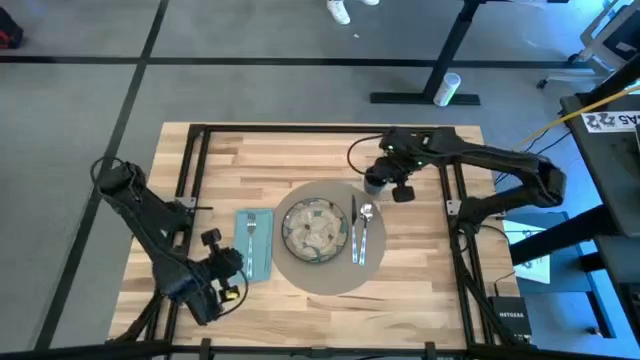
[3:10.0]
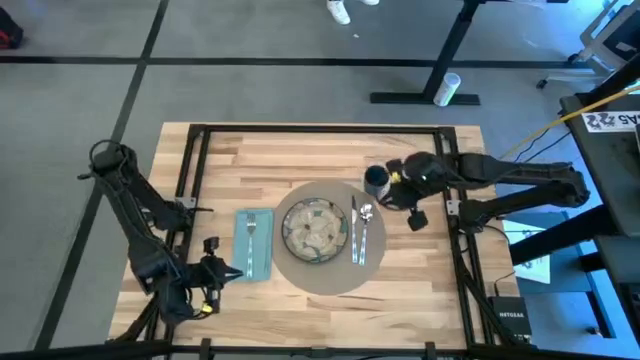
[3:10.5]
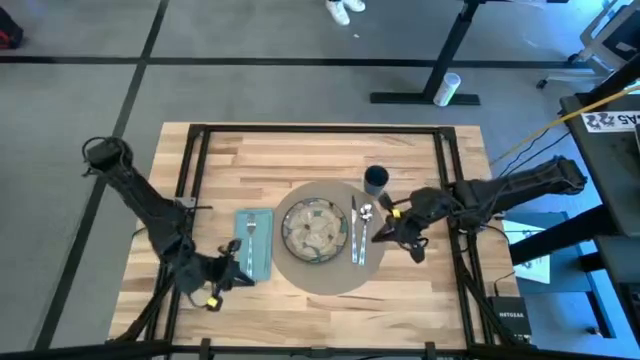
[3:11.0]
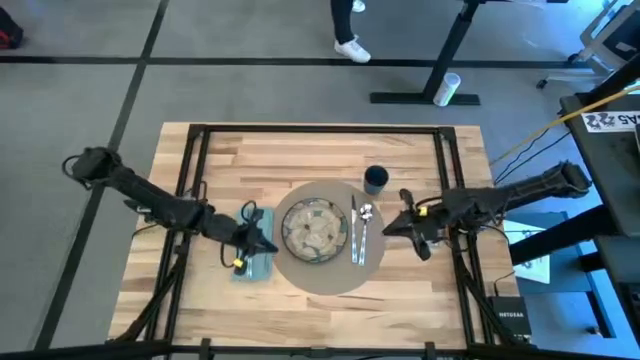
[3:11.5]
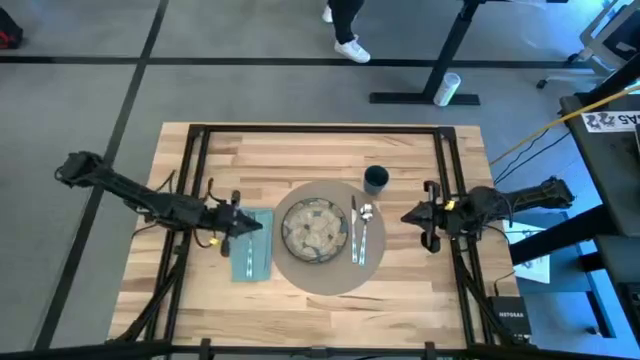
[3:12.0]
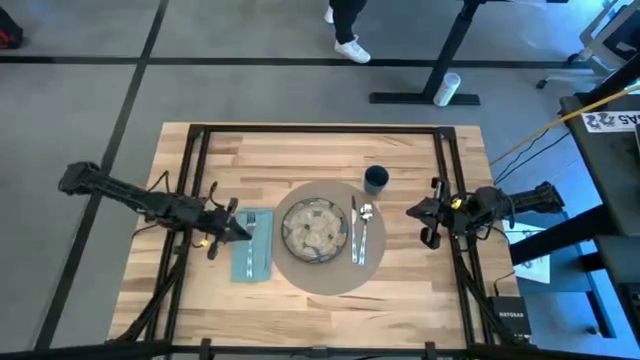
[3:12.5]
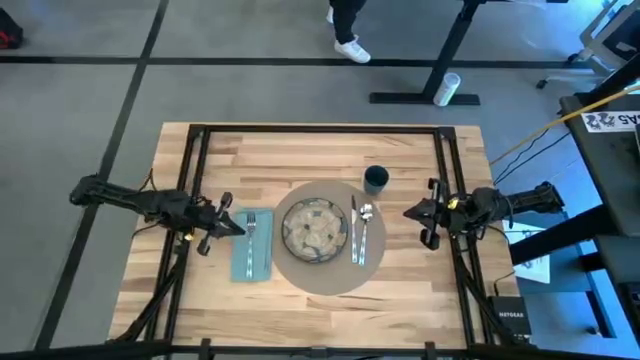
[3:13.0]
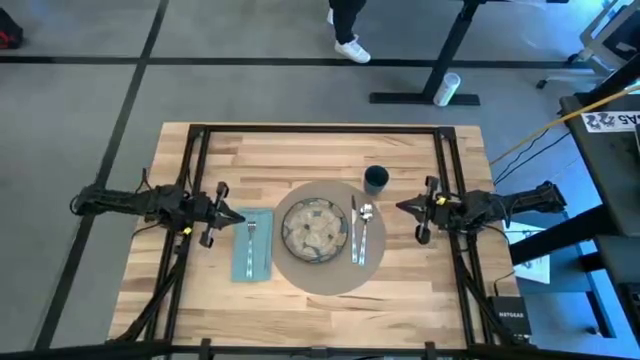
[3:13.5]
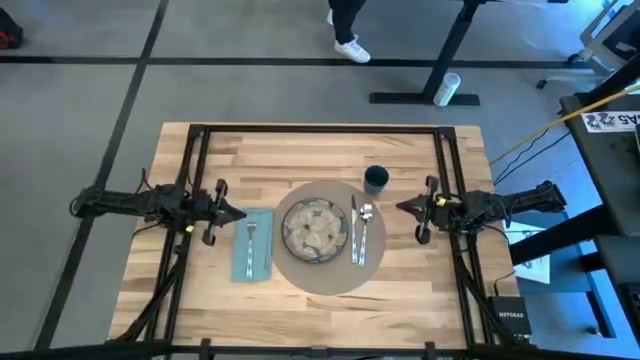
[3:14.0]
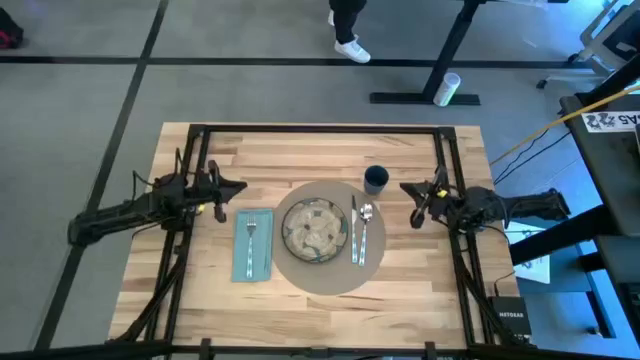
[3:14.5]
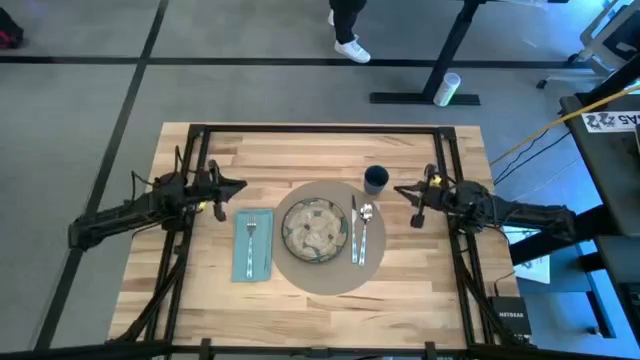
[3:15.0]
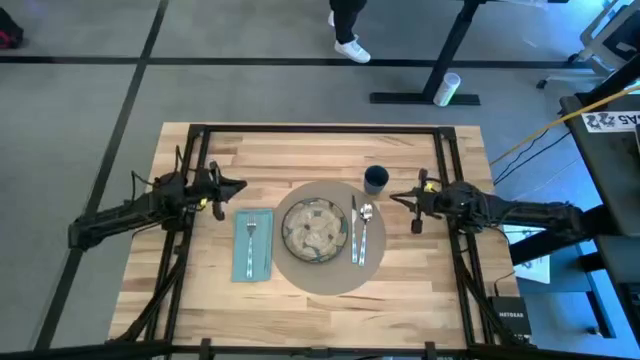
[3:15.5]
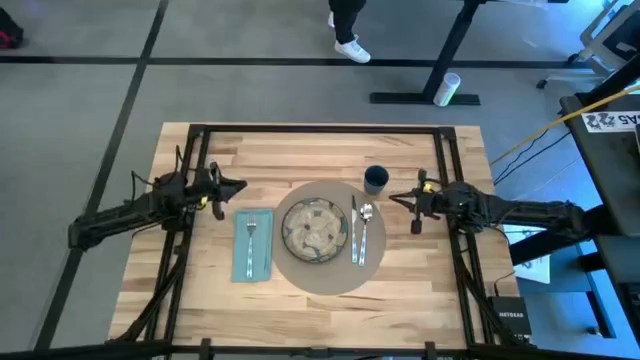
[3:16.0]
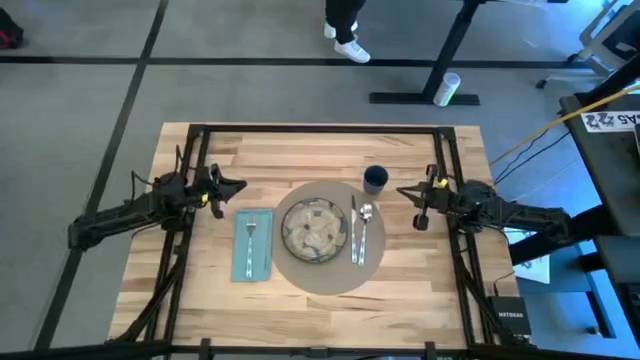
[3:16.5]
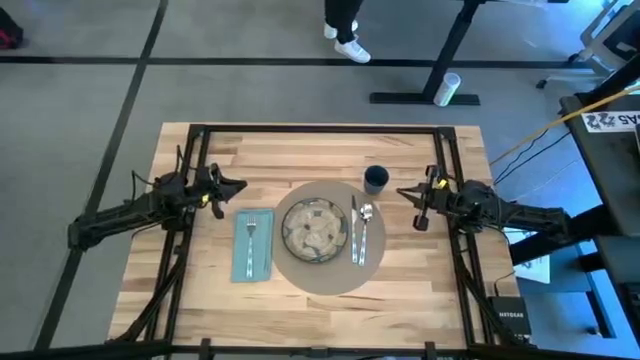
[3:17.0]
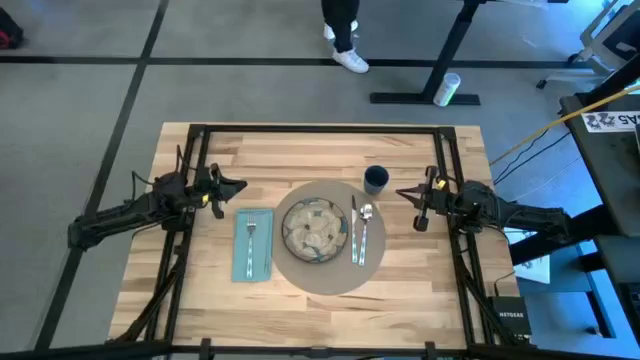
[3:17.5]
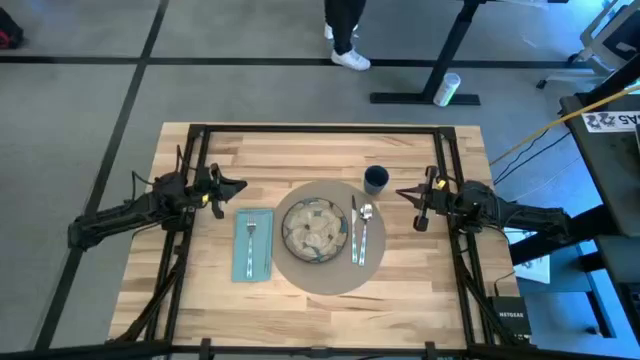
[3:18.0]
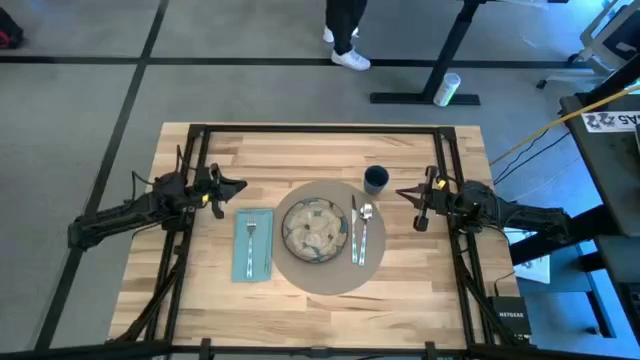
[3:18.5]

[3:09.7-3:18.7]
Task: Set table place
Return to Home Position

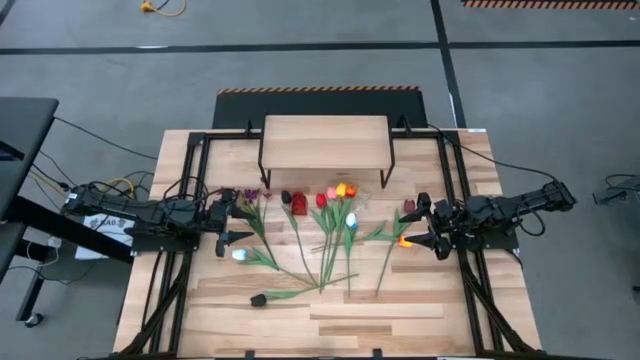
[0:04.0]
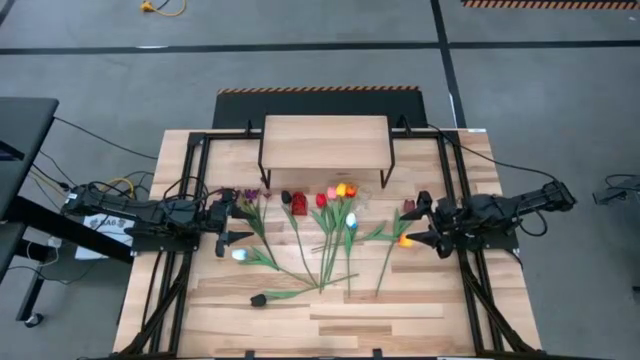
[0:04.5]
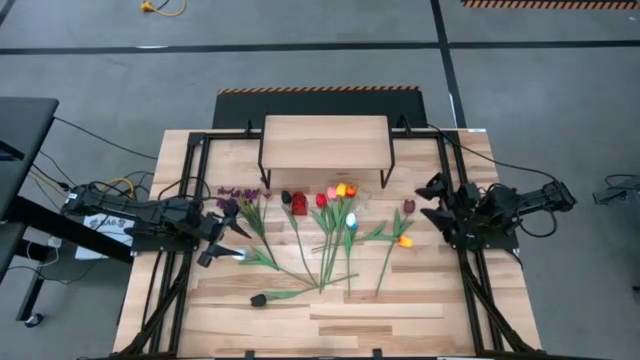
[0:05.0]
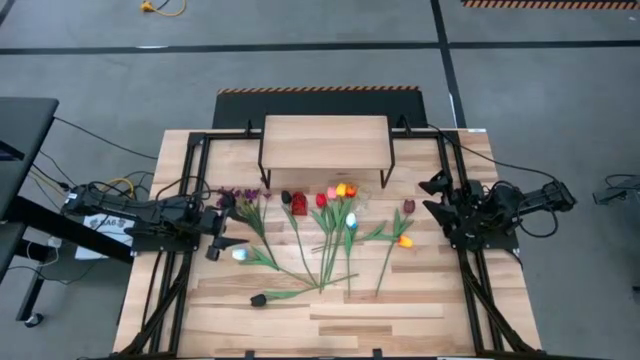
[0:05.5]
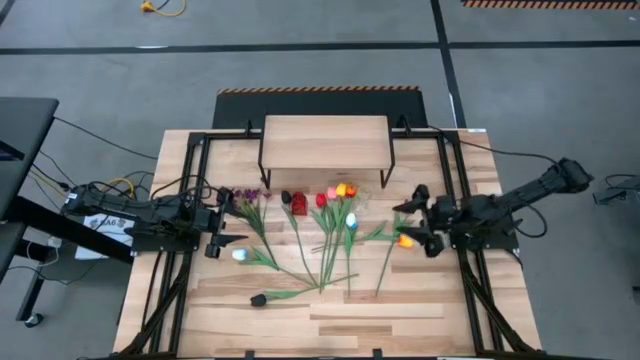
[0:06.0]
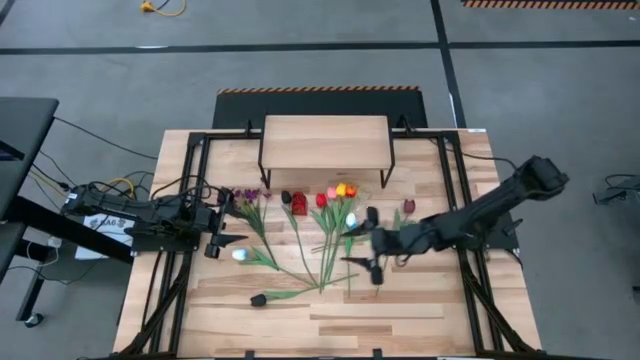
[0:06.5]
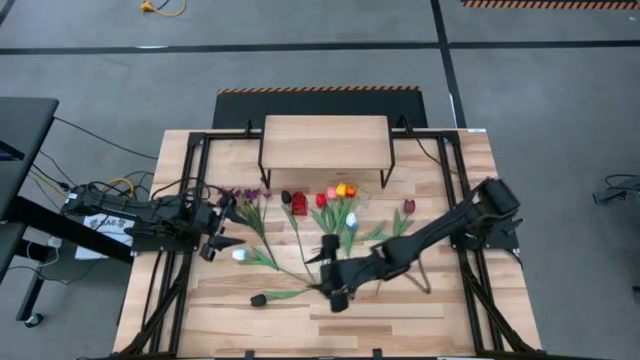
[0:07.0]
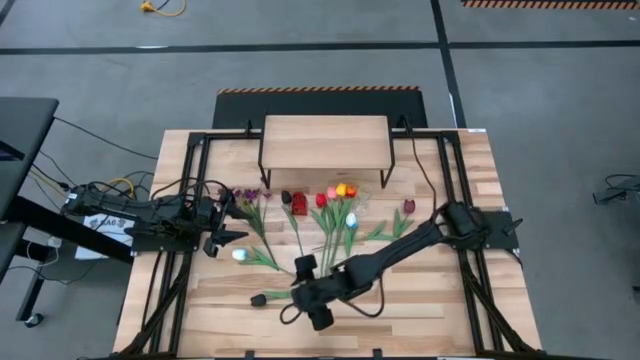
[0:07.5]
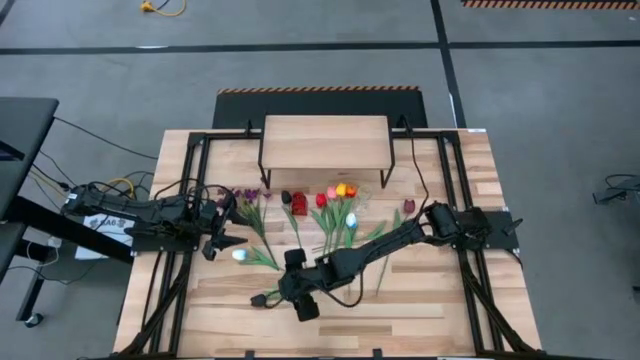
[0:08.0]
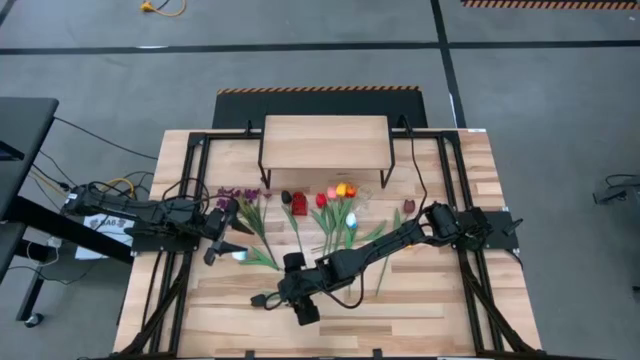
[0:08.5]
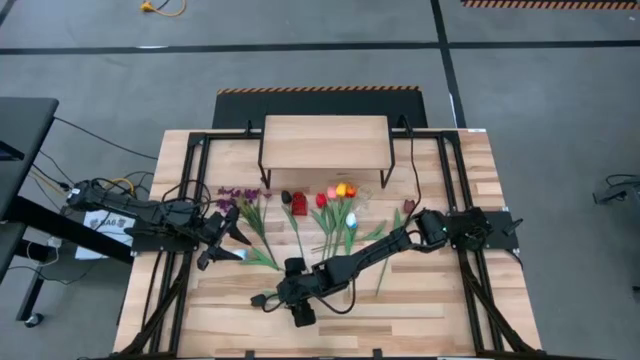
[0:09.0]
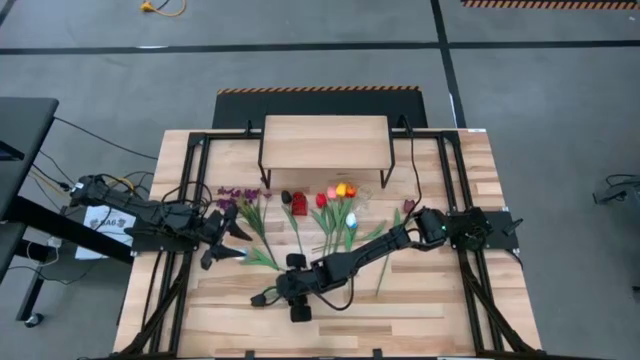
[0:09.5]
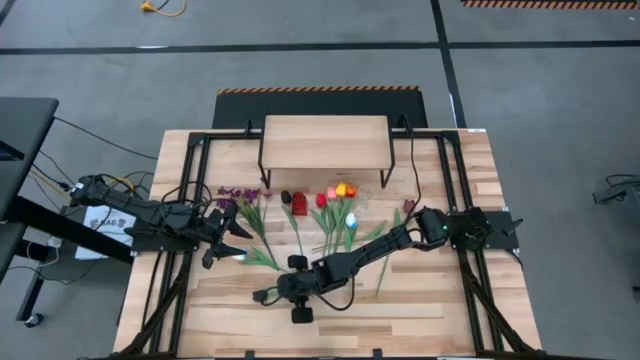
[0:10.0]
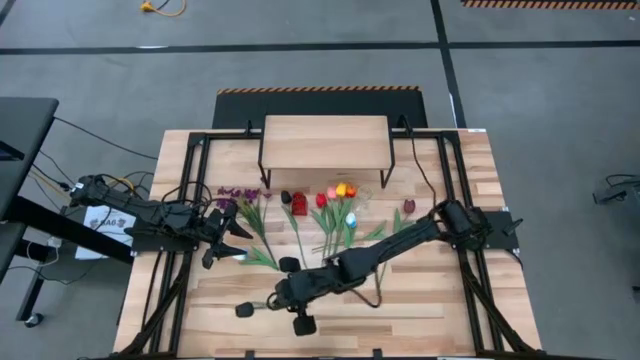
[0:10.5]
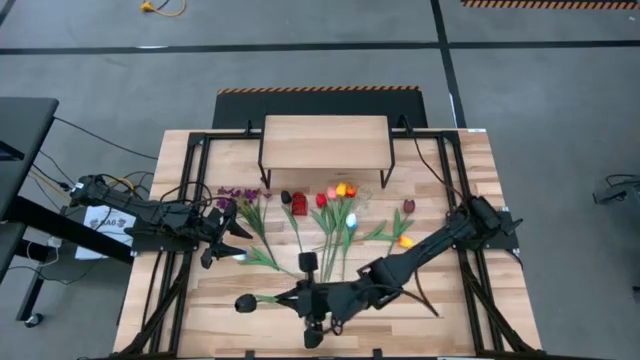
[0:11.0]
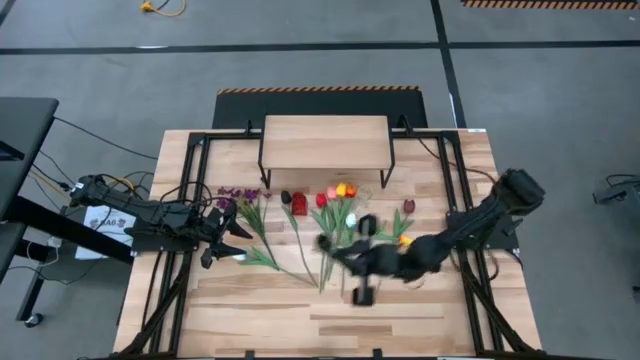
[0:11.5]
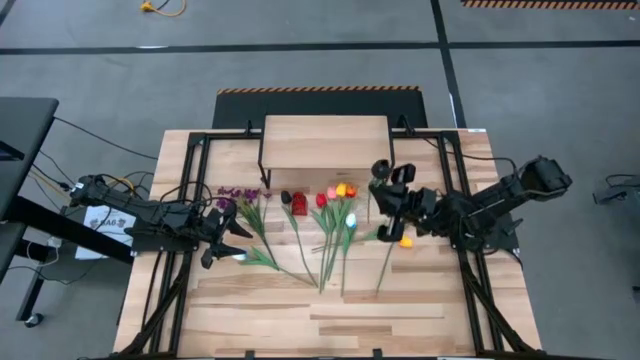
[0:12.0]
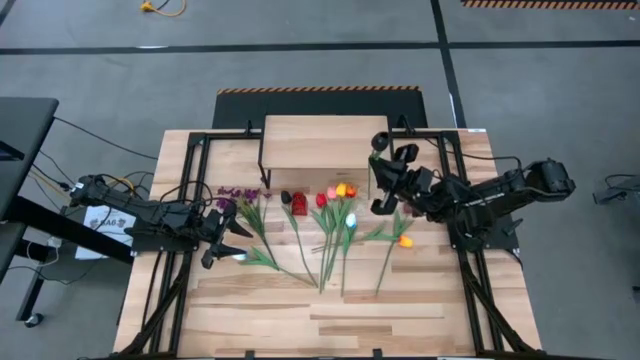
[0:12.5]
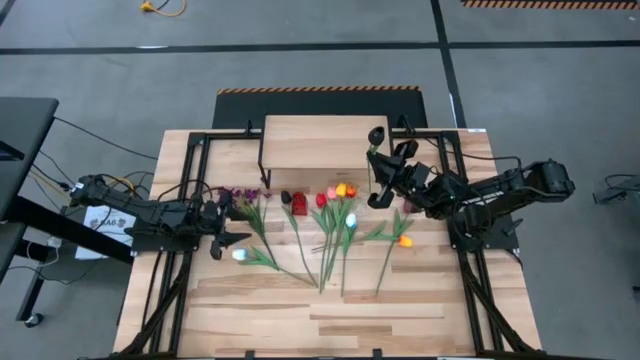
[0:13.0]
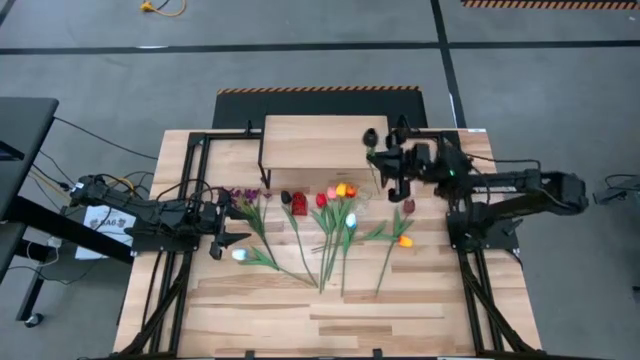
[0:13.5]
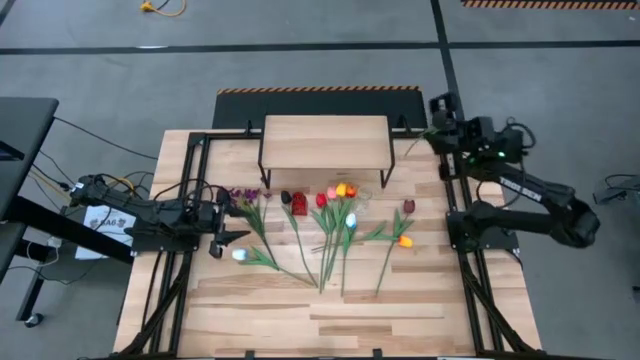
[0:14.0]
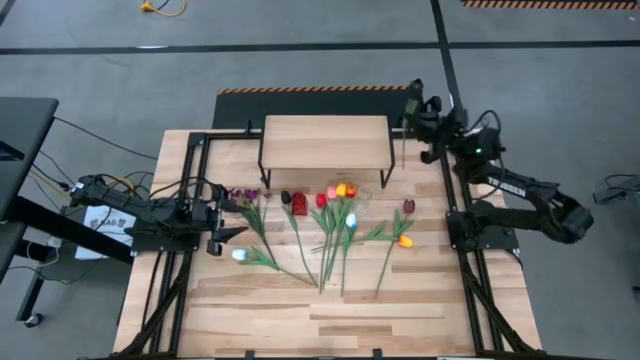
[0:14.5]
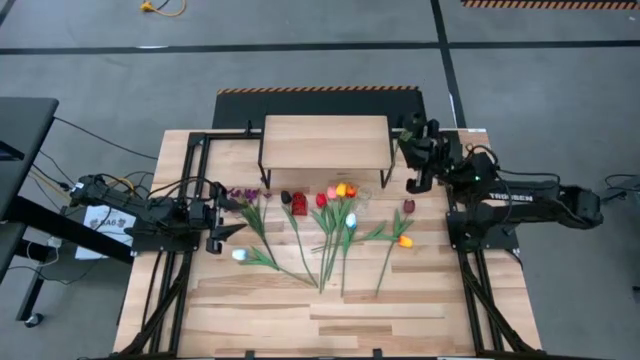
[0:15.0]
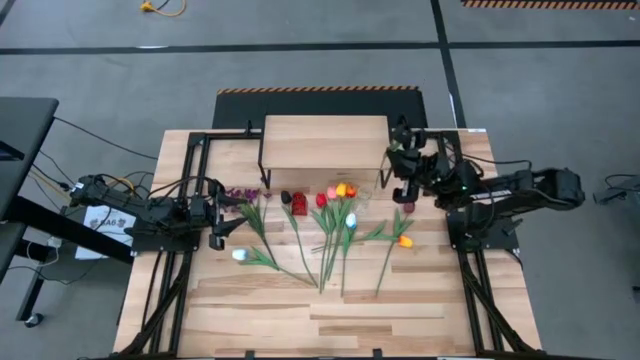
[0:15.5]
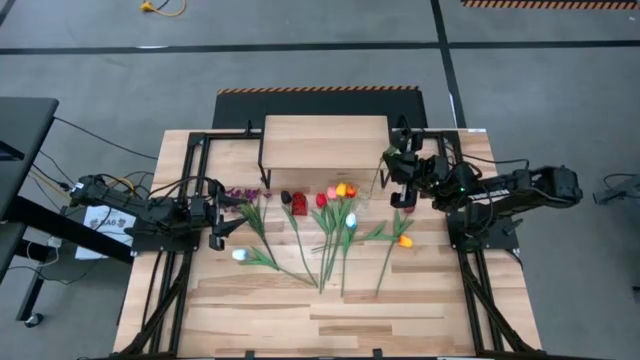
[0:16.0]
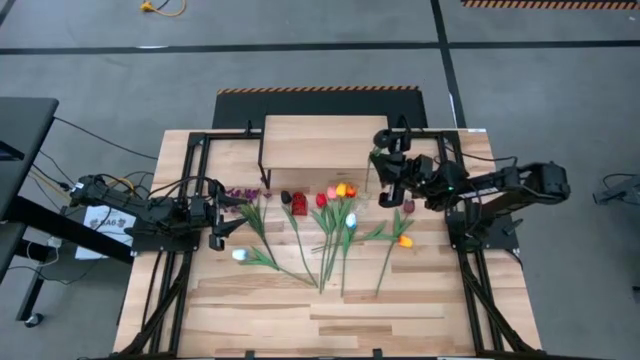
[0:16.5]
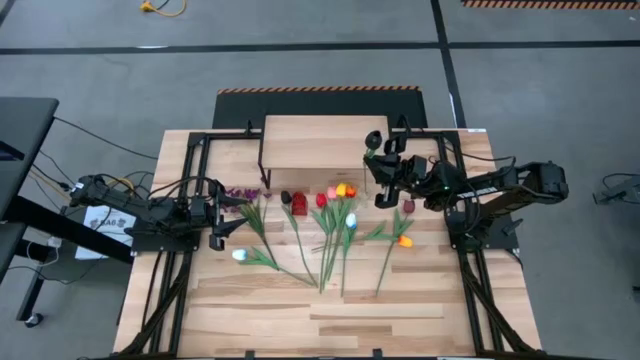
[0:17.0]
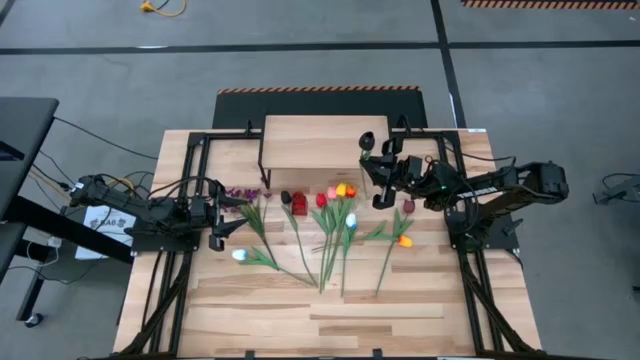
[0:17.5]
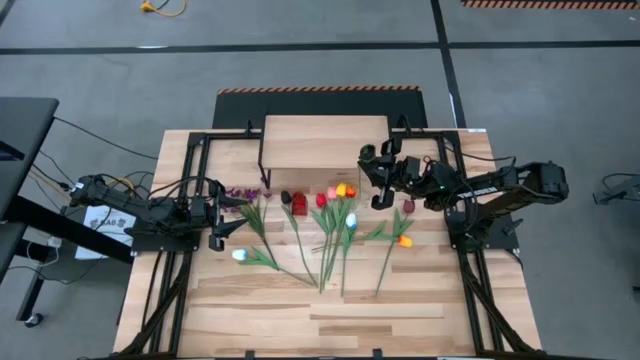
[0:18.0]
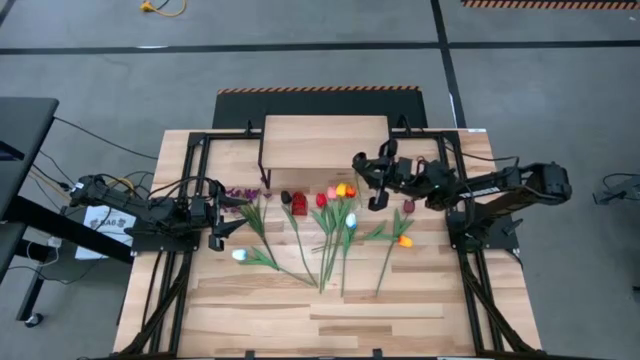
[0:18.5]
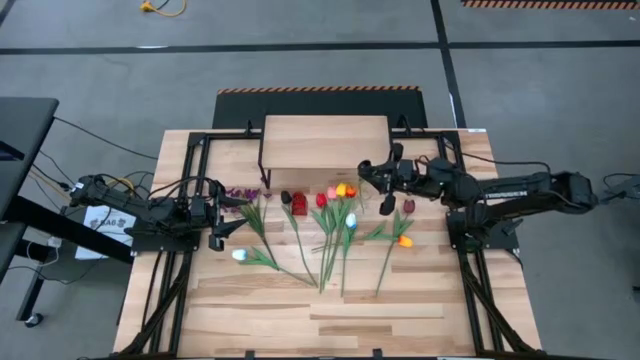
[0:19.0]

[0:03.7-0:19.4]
Task: Pick and place flowers into a vace then onto a shelf
Put the bottom black flower into the transparent vase
